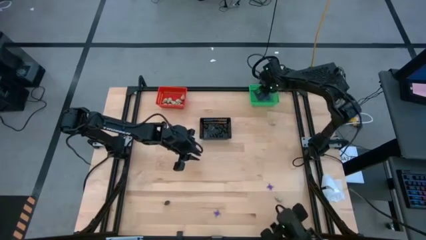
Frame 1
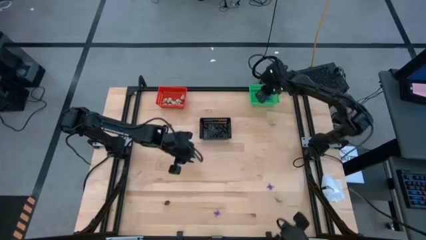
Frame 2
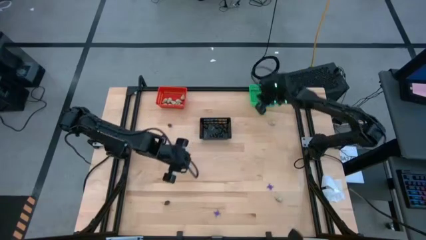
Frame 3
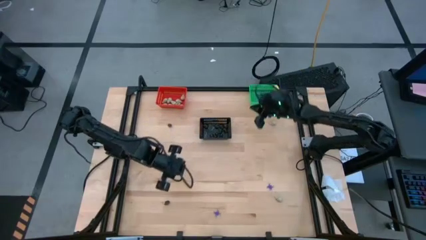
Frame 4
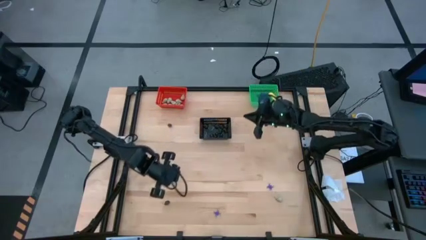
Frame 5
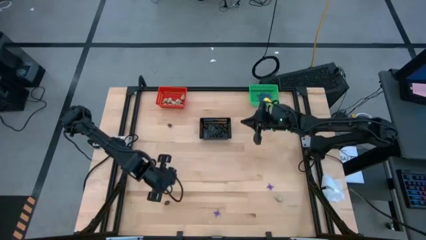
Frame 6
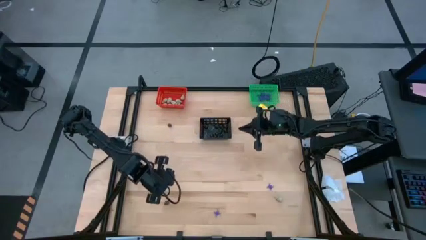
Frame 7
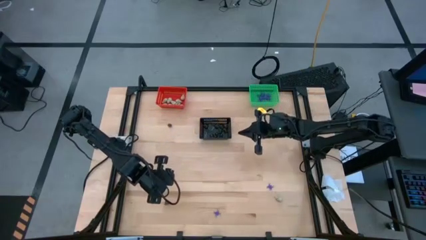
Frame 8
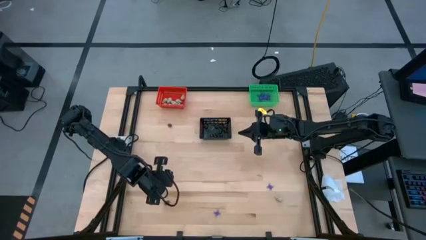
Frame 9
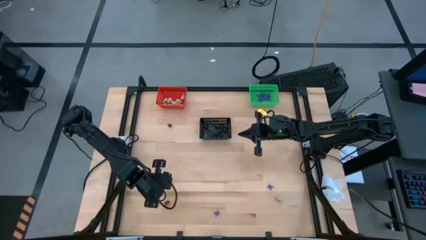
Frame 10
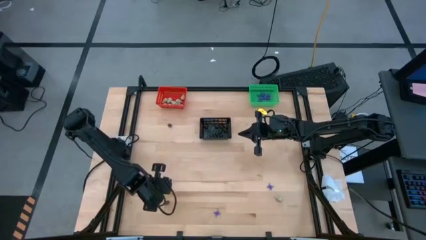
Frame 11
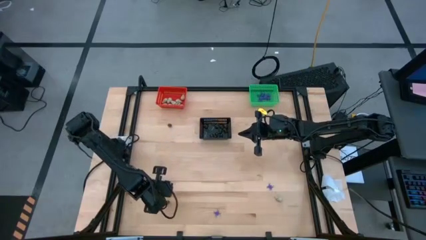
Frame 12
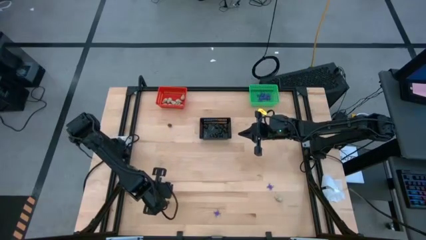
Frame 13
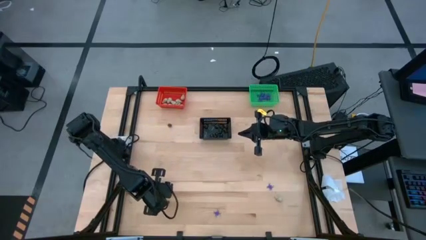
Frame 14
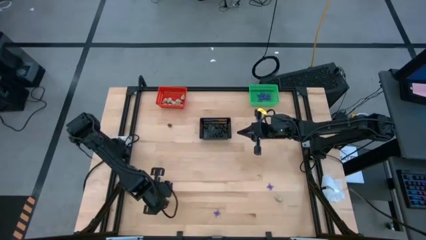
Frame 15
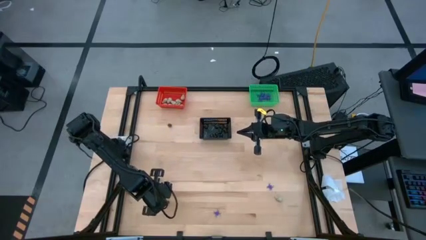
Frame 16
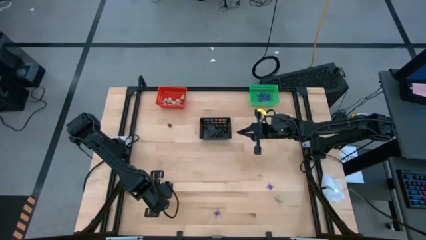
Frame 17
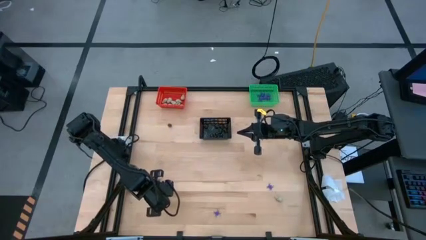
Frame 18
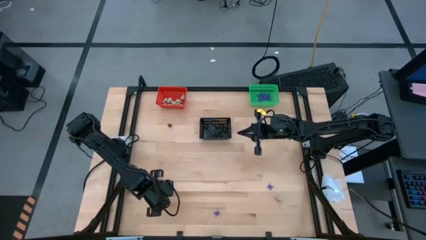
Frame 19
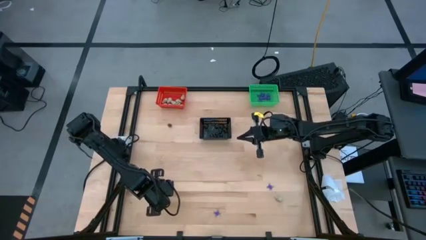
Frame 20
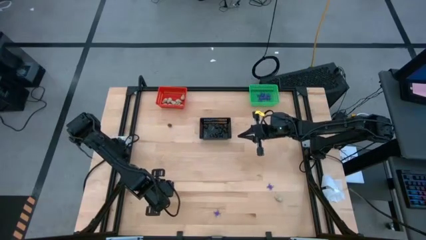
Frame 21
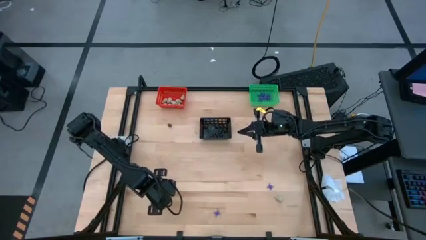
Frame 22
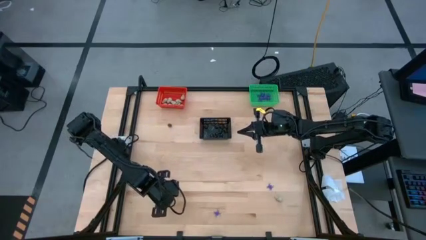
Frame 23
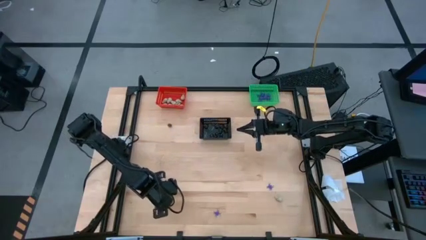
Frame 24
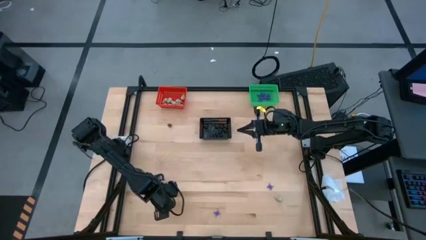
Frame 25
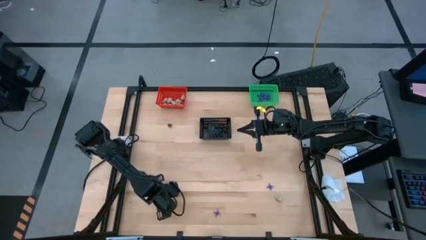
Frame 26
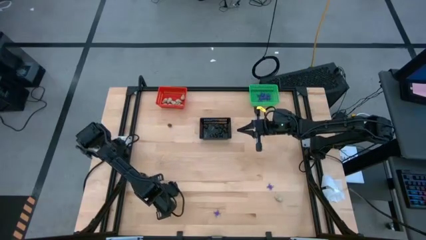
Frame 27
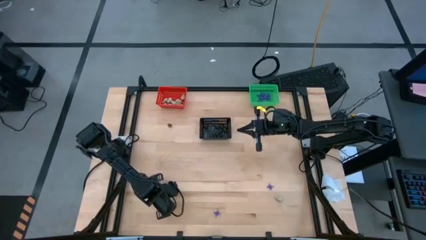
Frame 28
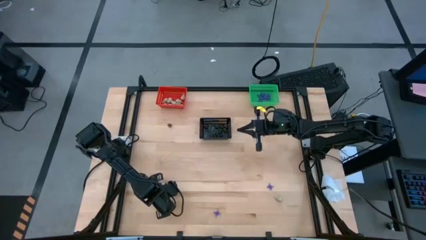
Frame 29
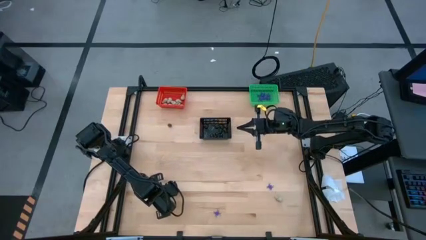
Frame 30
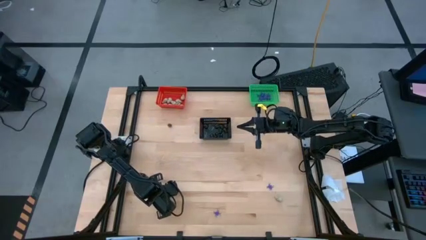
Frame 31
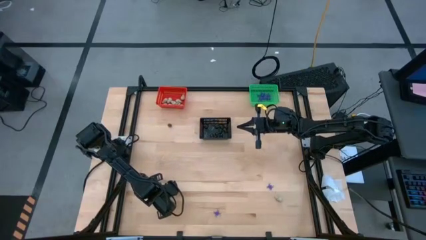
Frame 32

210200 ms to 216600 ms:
Task: Sort Halloween decoration
Put the black skull toy into the black bin

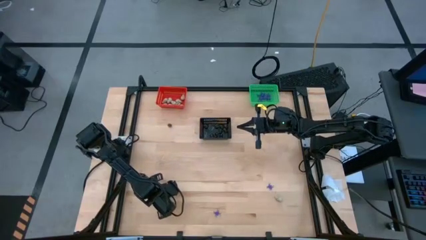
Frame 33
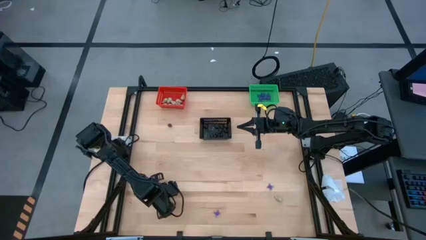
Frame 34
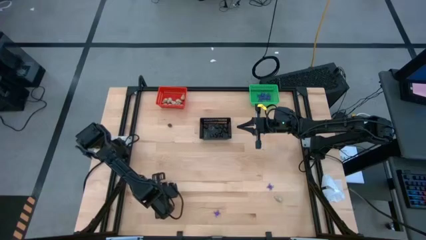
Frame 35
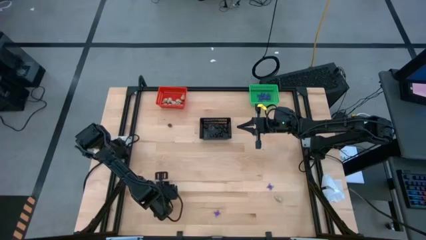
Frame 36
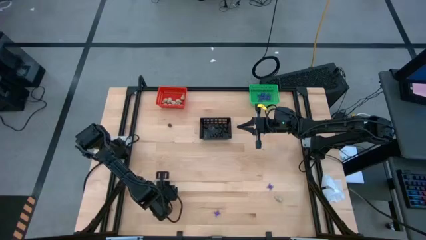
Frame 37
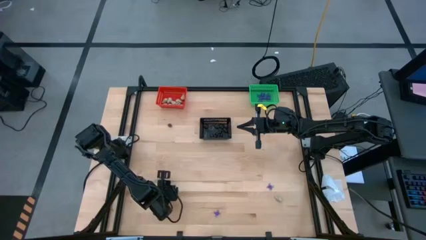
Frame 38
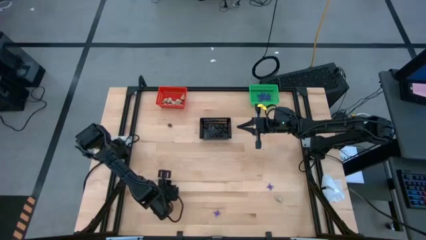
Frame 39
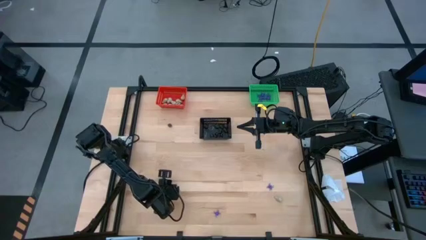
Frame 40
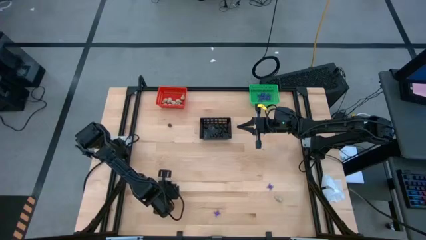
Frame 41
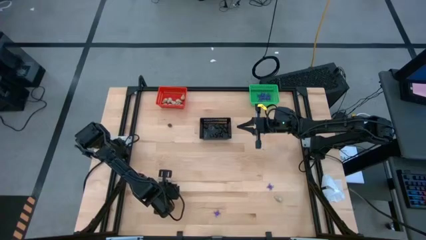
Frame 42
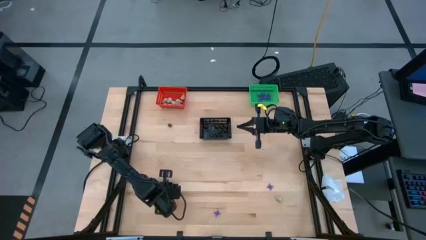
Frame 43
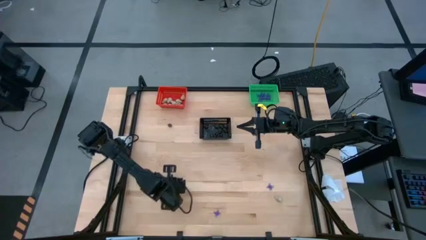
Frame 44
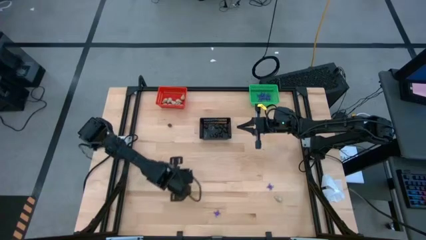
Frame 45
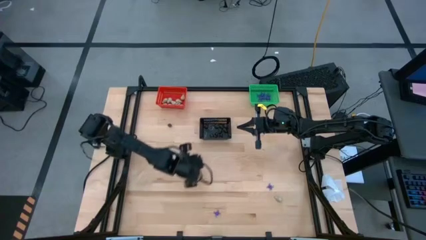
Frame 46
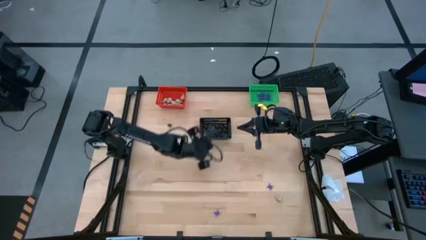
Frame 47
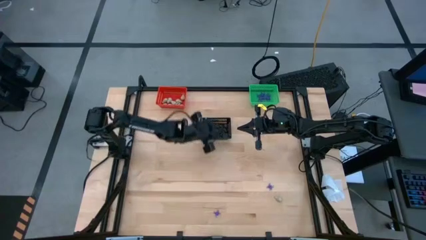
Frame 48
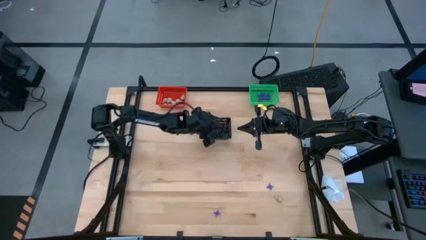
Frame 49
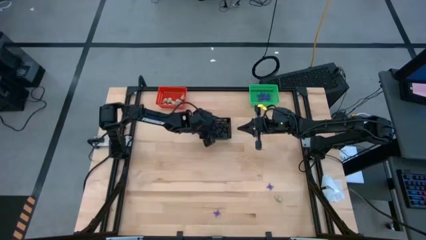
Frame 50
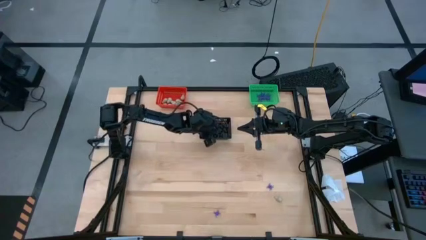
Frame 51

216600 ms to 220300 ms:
Put the black skull toy into the black bin

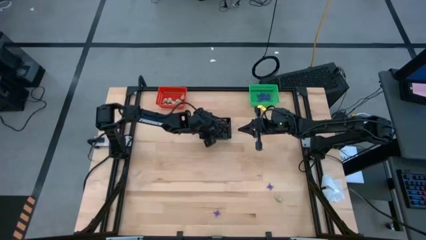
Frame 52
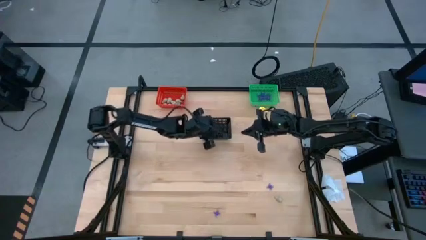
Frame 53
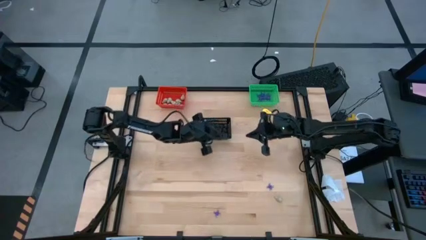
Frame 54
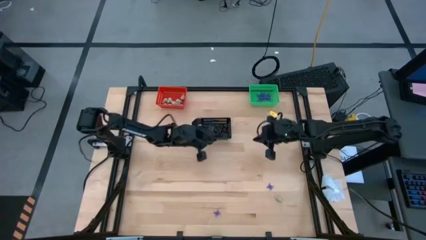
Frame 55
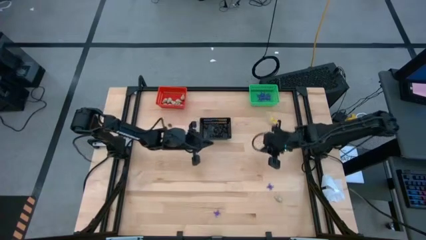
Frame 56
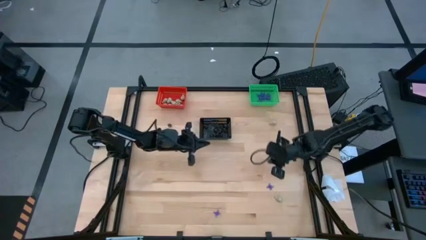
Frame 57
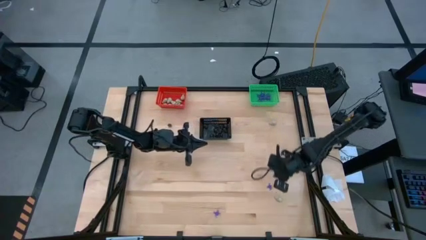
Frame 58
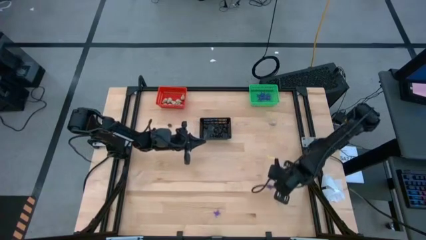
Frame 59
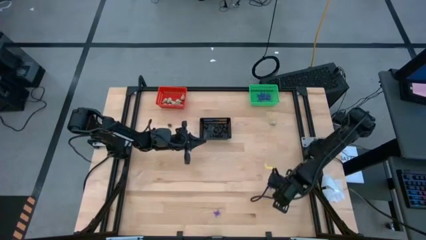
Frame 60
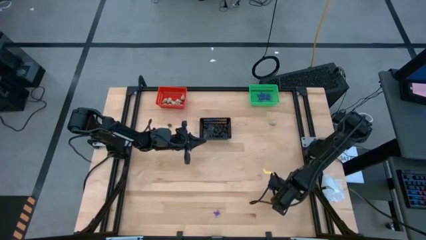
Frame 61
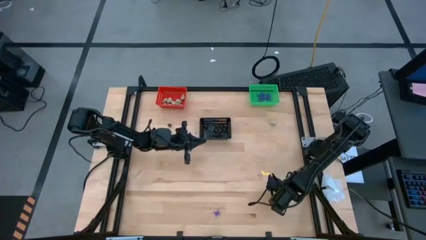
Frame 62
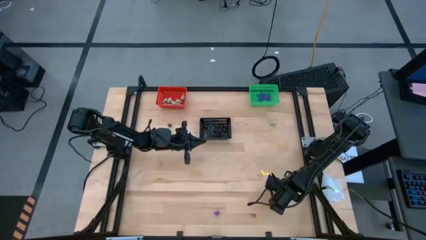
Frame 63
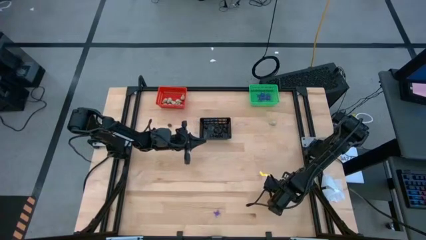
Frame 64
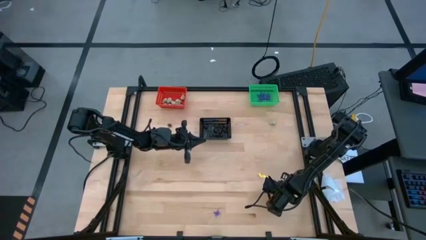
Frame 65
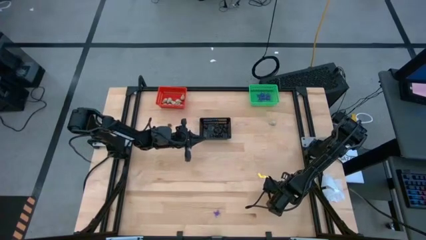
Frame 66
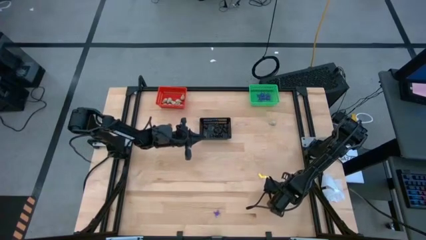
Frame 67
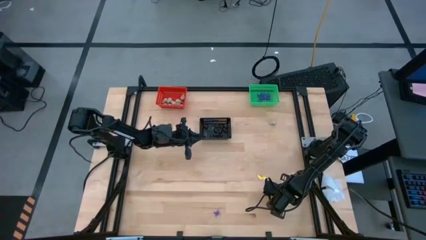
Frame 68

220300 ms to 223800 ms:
Put the white skull toy into the orange bin

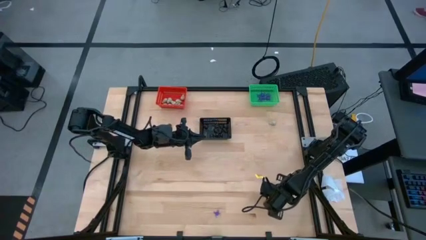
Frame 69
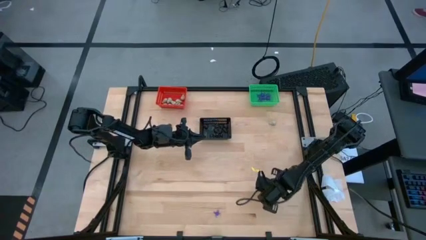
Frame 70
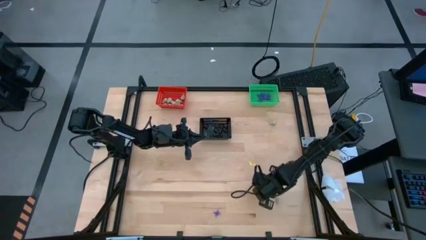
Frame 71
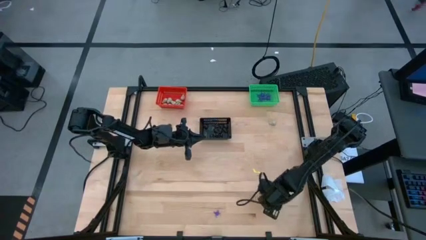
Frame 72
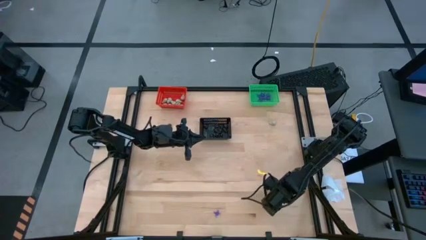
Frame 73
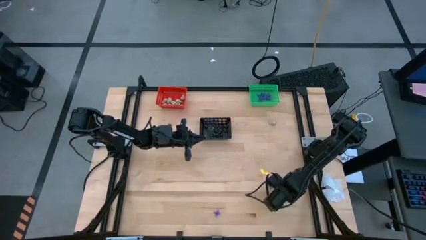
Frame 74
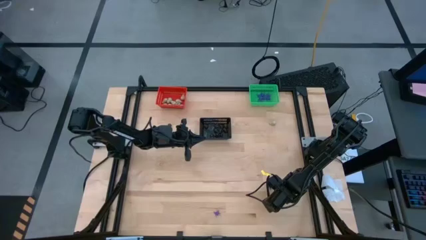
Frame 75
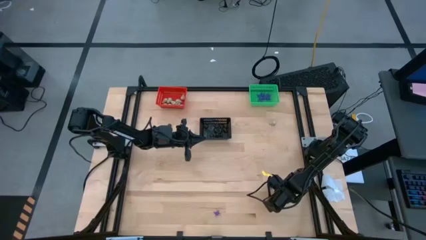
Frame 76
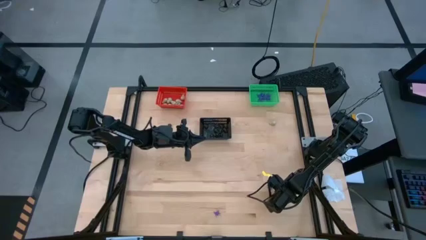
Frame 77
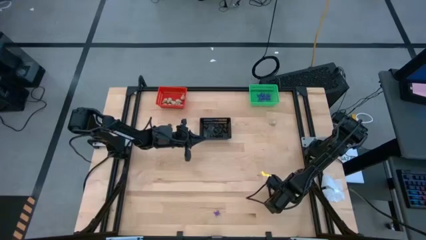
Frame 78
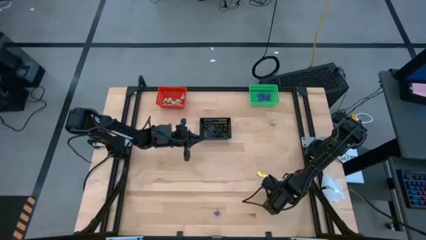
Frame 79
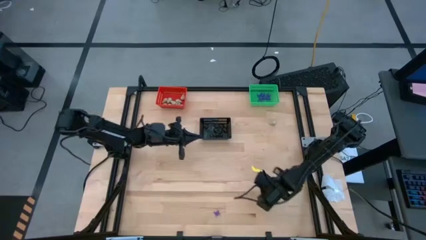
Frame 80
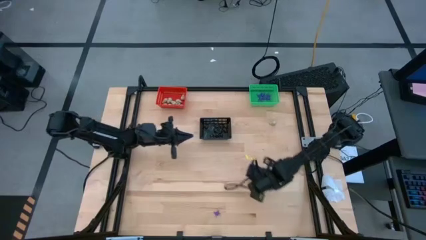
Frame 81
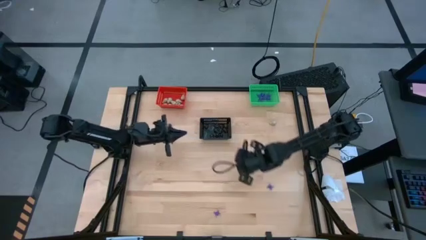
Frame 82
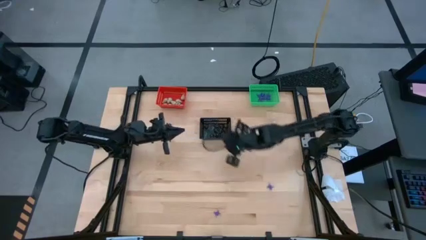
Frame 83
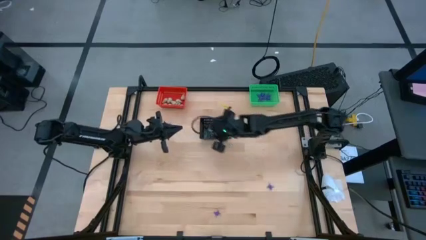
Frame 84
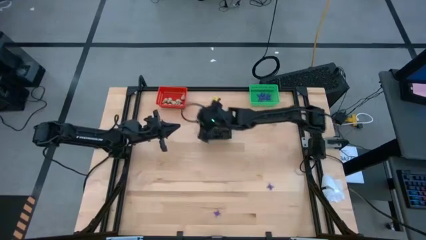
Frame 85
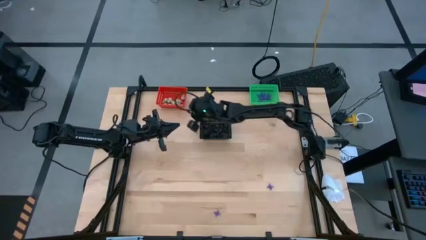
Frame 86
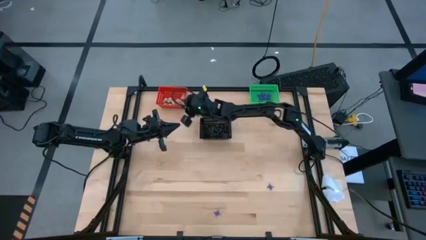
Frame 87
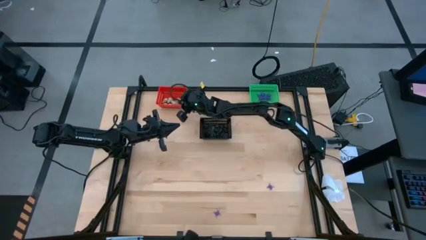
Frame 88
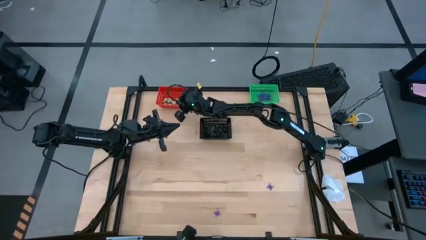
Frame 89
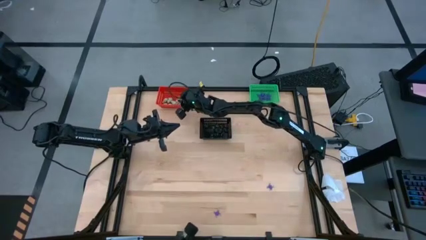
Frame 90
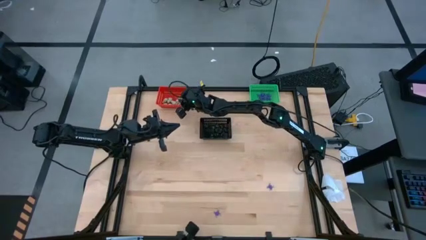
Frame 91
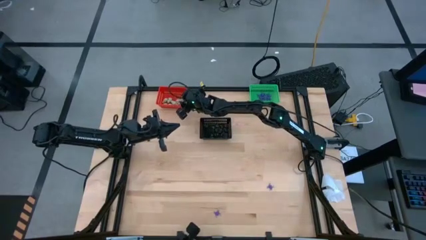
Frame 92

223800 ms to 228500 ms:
Put the white skull toy into the orange bin
